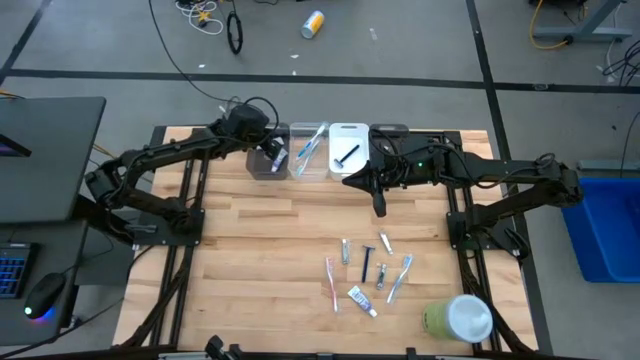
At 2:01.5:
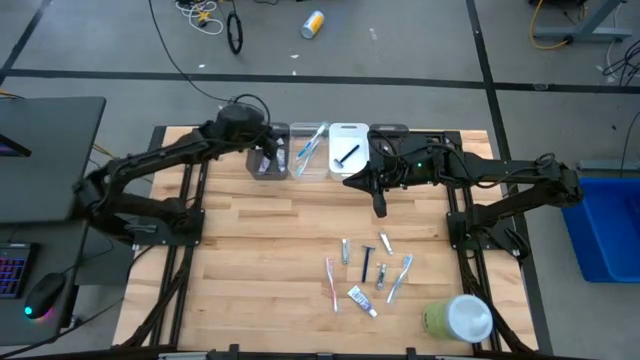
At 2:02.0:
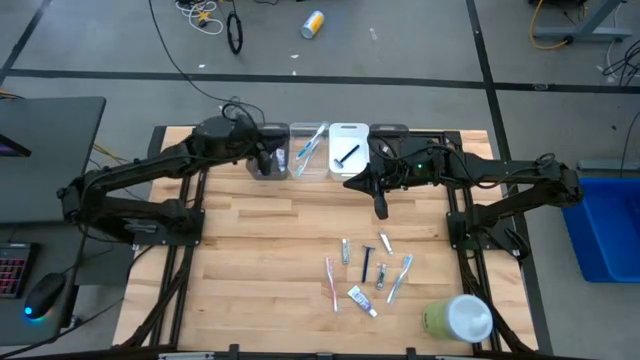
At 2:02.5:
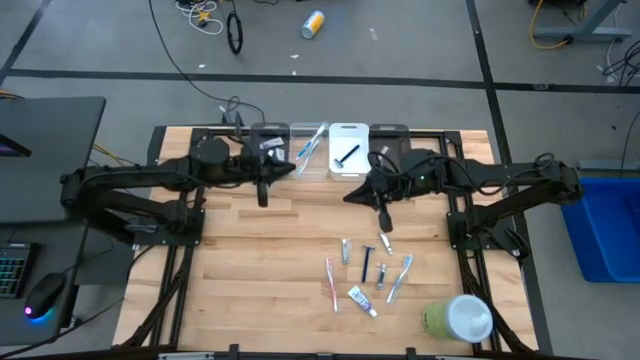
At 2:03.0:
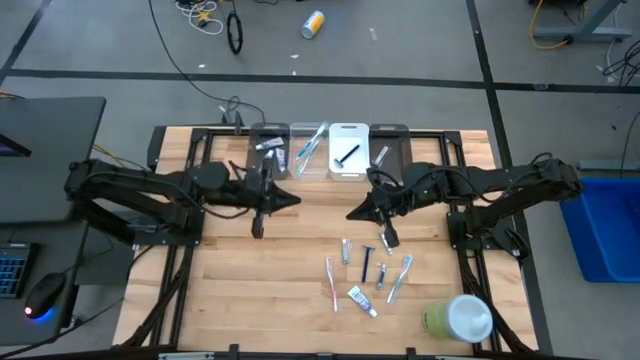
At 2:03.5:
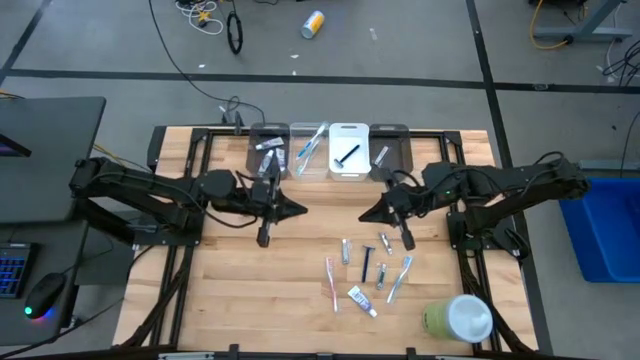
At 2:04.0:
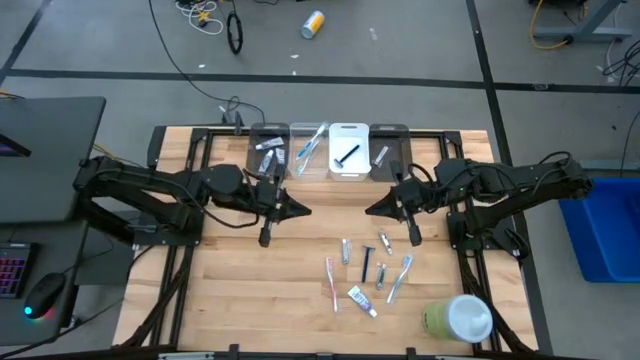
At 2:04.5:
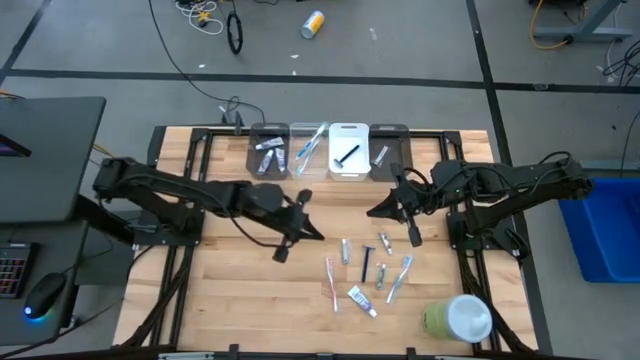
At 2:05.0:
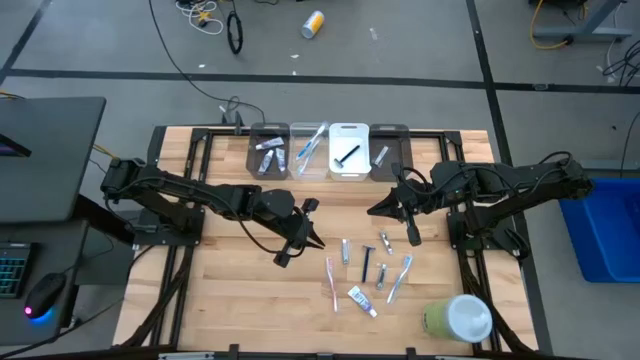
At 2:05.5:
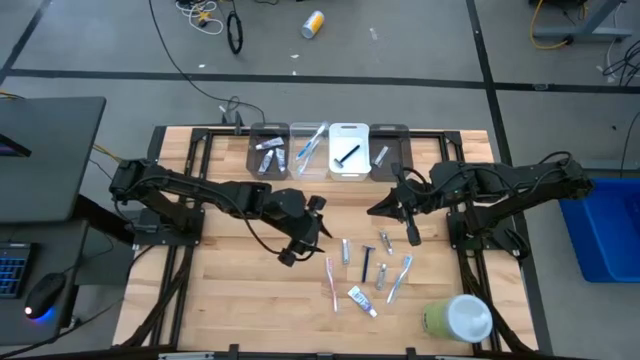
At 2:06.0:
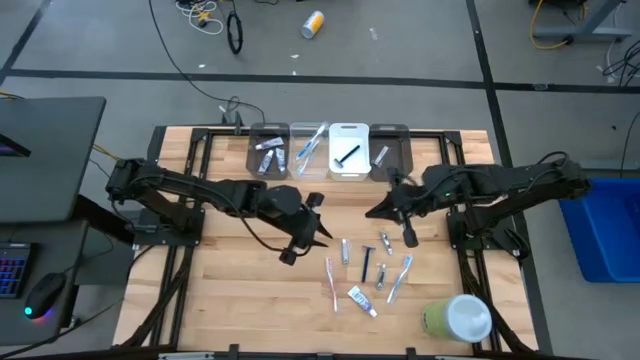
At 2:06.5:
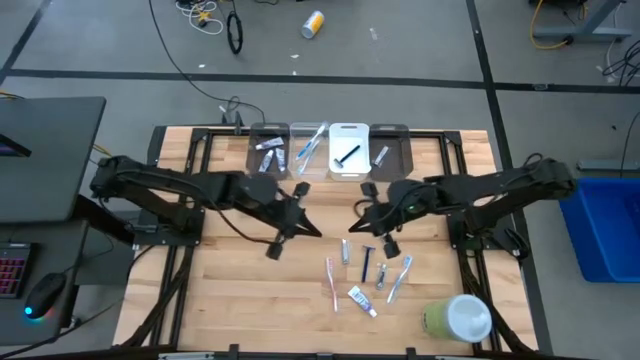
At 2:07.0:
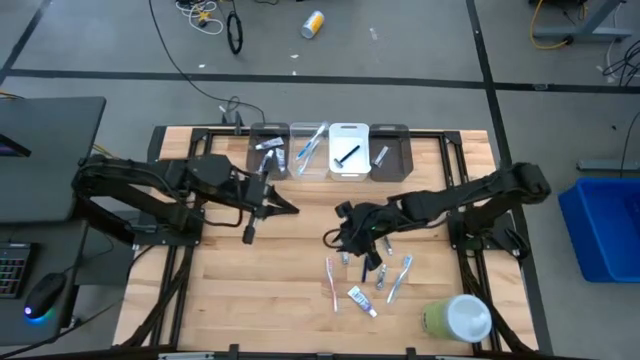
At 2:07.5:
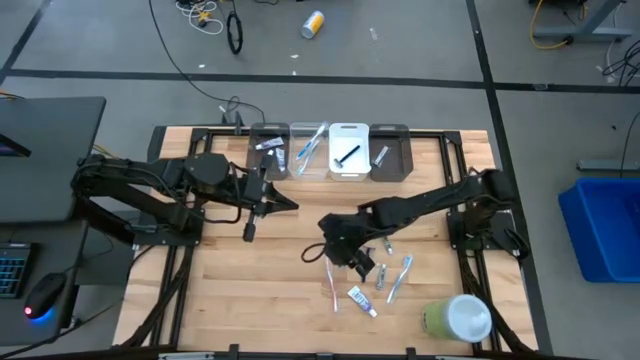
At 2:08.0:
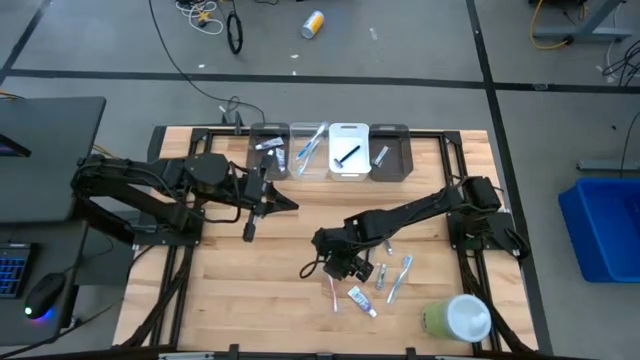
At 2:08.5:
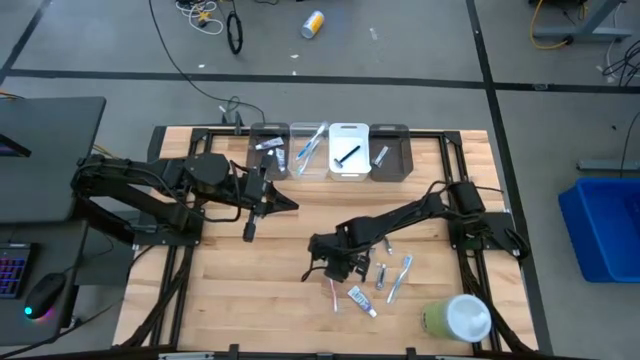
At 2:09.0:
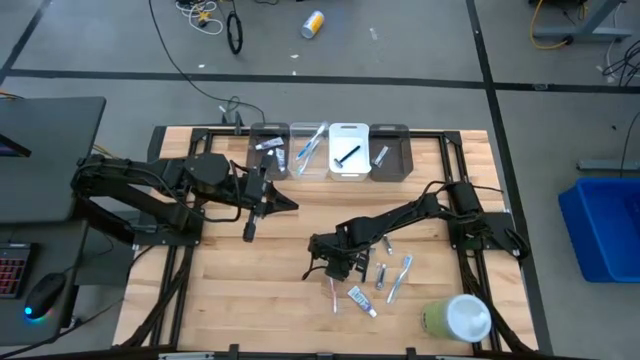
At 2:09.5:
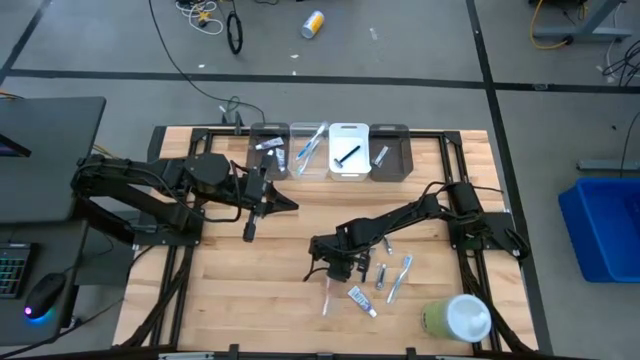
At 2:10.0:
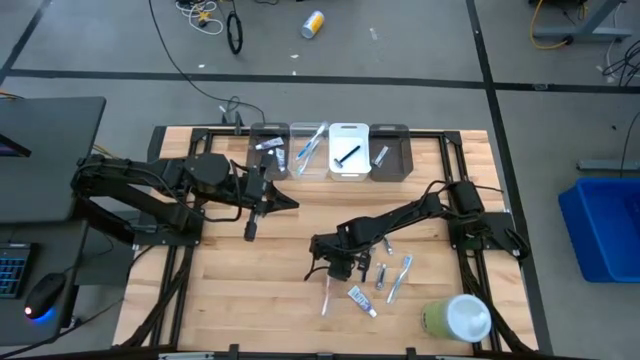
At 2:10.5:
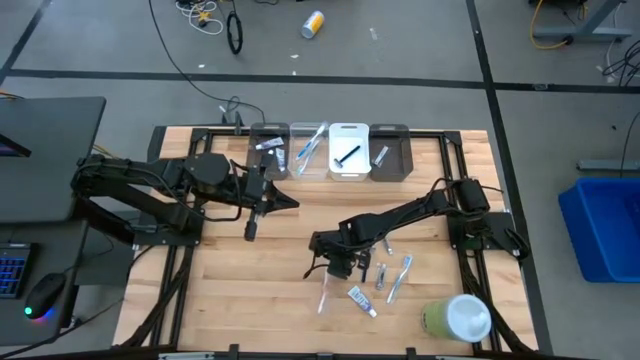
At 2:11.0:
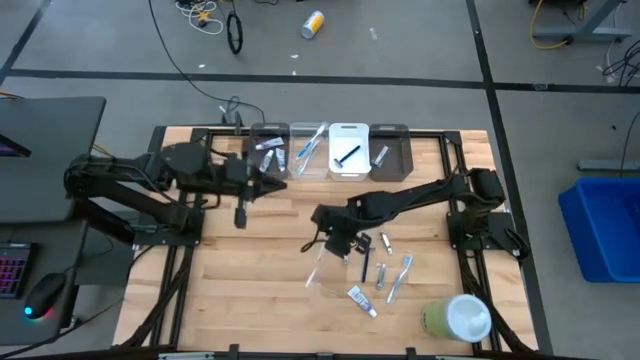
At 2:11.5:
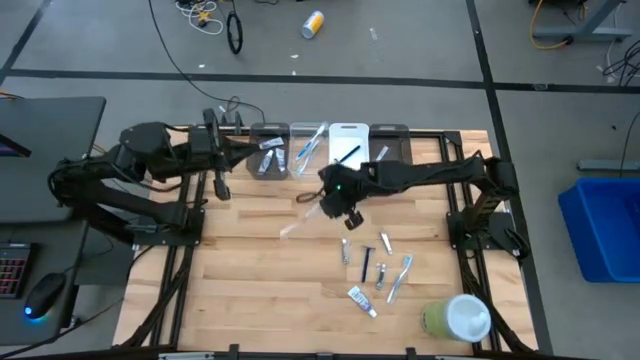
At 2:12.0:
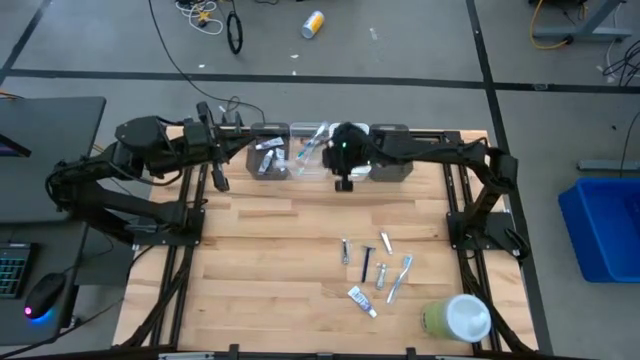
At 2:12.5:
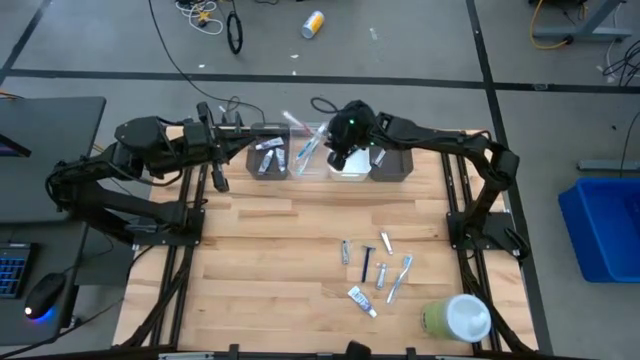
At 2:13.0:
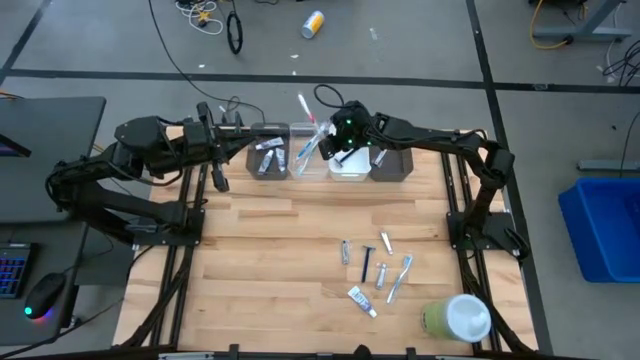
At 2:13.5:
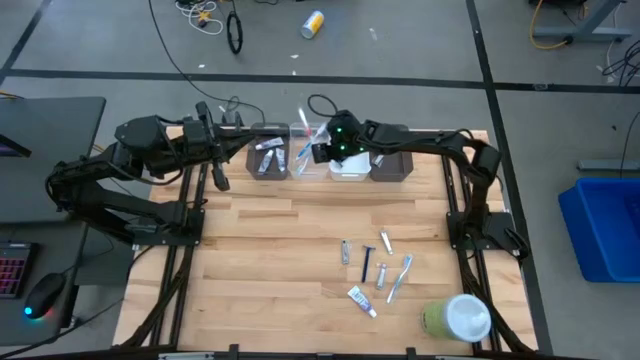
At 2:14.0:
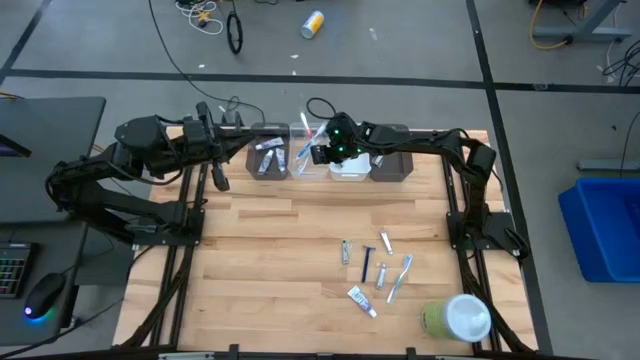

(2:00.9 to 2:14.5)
Task: Pick & Place Travel size toiletries
Put the orange toothbrush into the transparent bin

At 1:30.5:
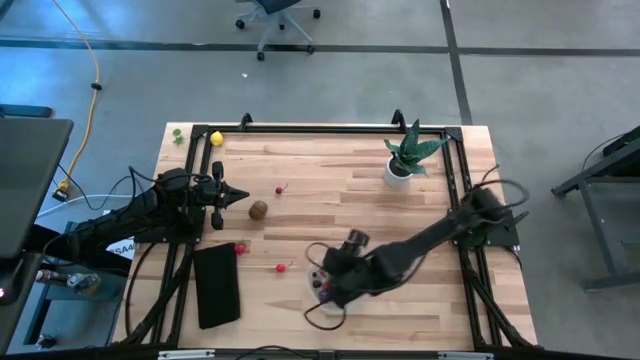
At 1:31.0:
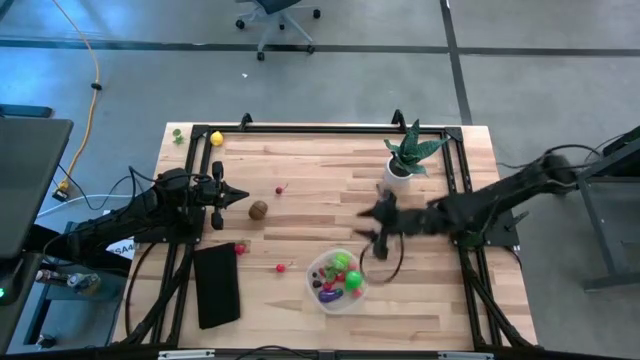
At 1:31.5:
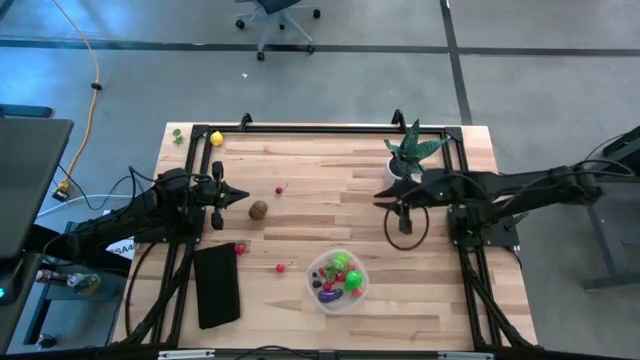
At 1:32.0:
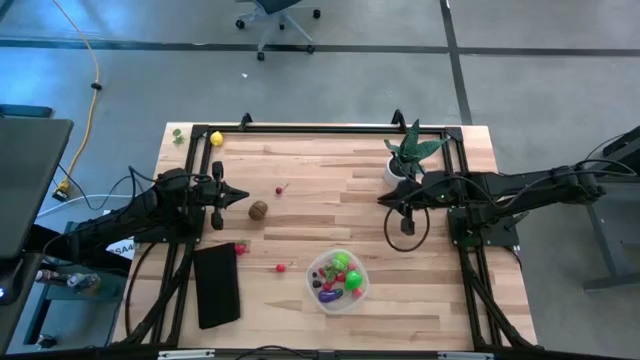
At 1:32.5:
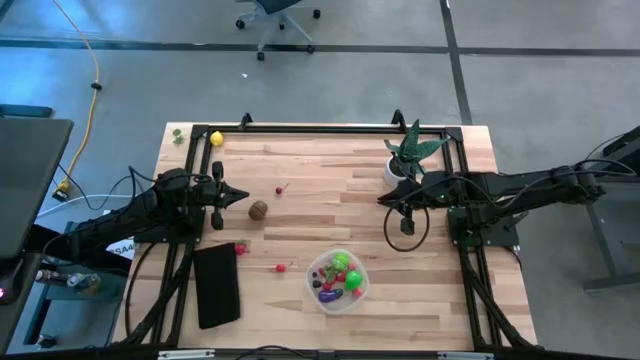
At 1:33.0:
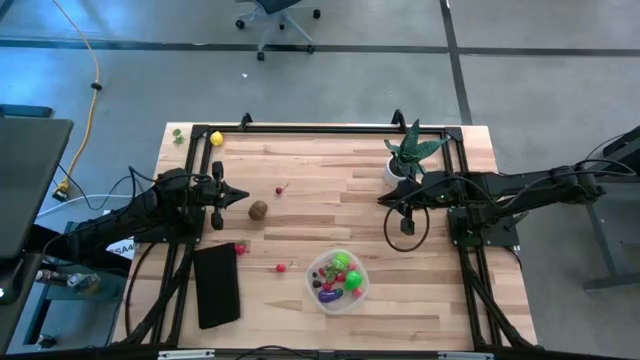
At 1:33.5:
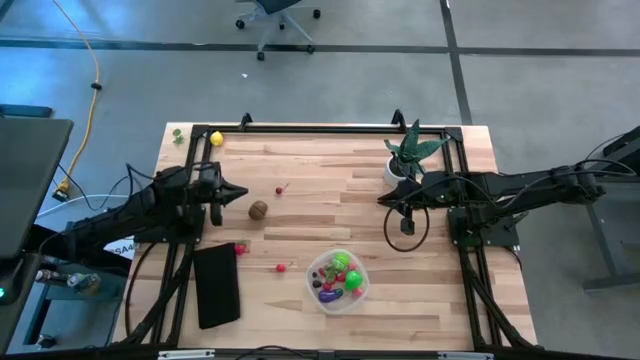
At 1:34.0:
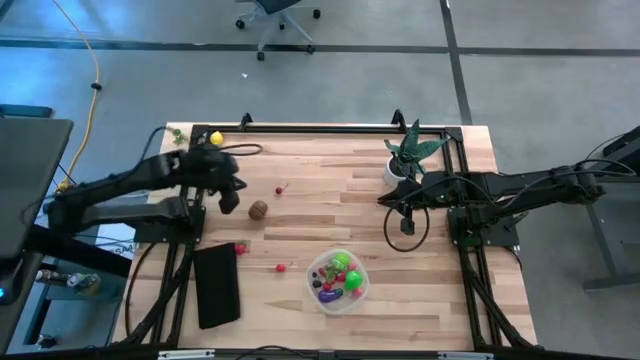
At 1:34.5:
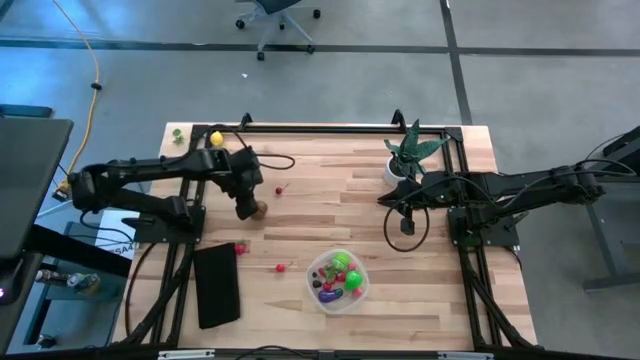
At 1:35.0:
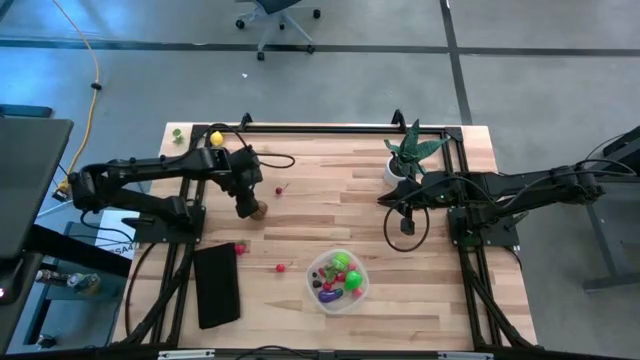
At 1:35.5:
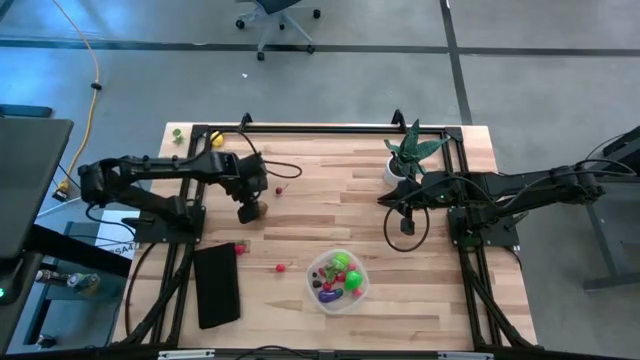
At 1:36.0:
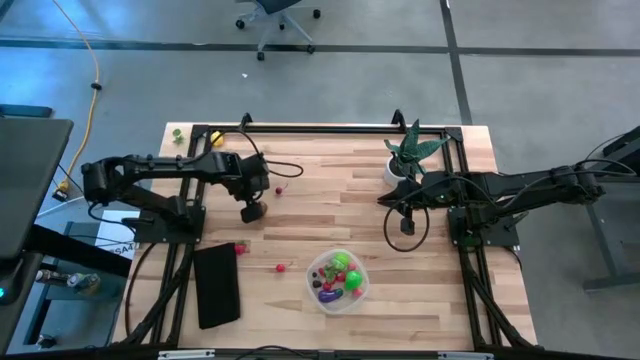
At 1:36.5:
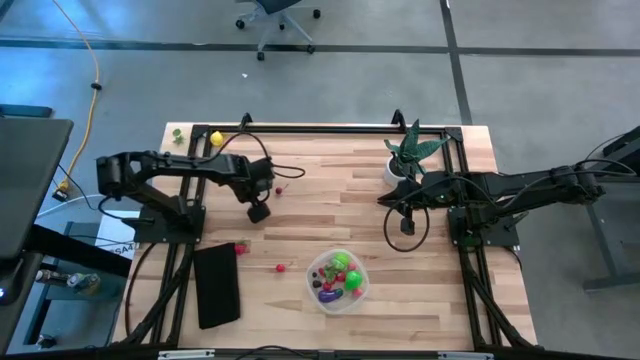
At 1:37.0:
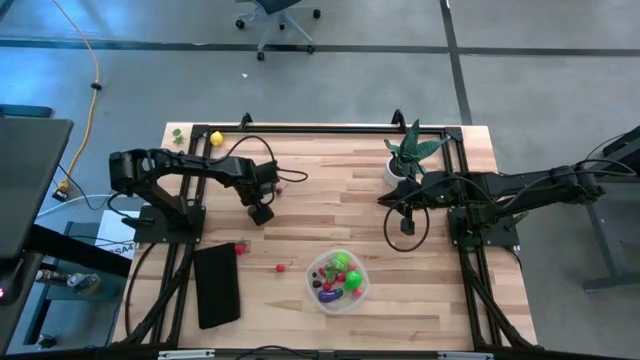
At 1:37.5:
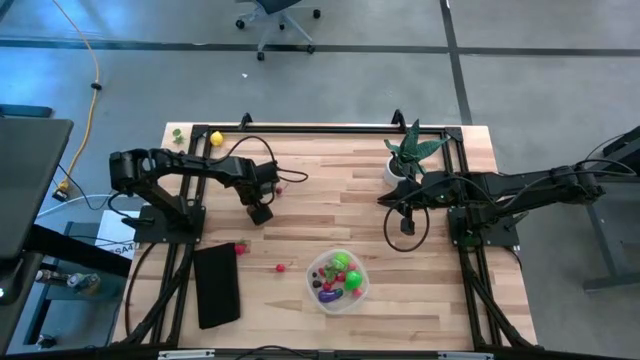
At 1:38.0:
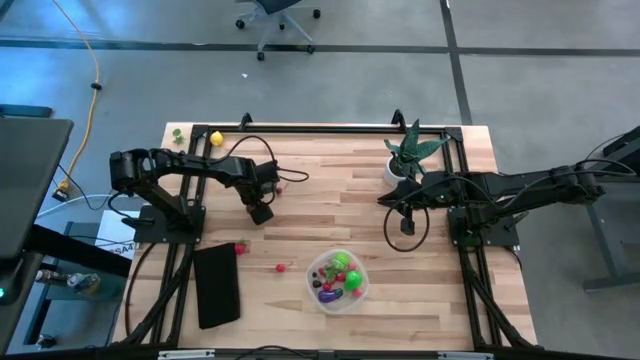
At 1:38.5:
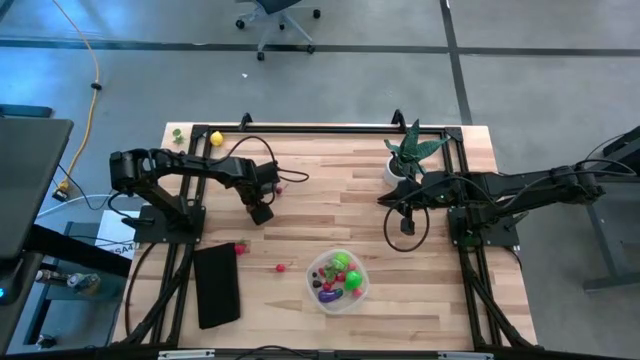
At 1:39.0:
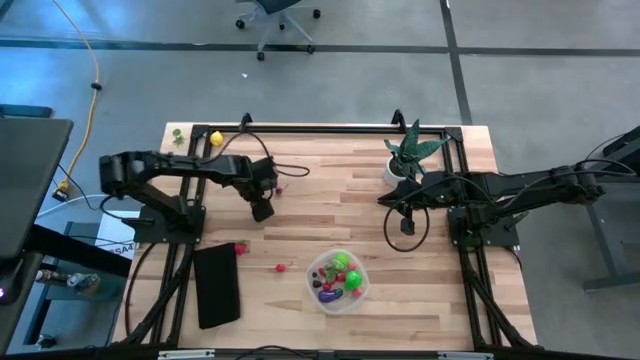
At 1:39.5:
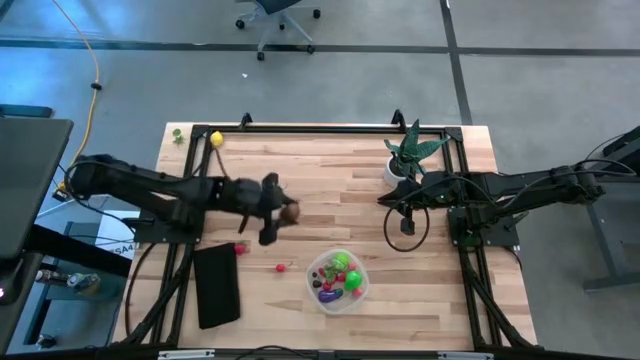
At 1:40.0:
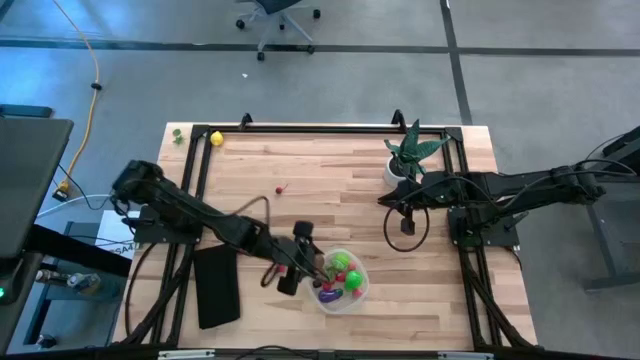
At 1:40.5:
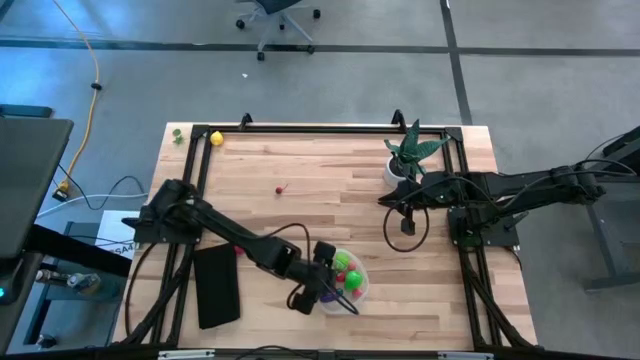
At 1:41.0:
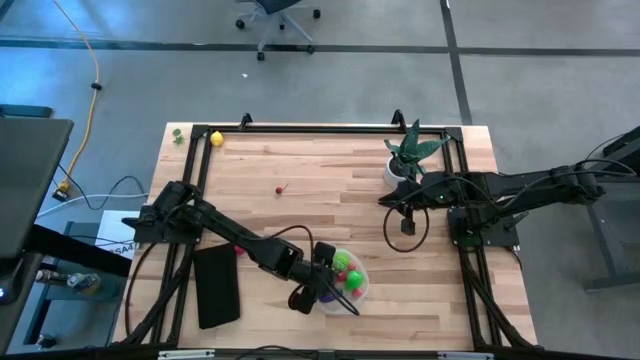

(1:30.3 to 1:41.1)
Task: Pick and placing Produce into tupperware
Put the brown kiwi into the transparent container
